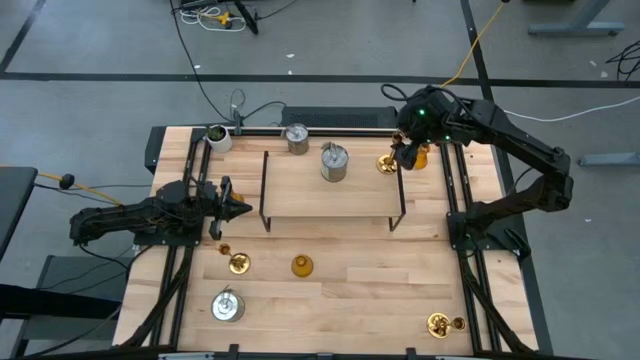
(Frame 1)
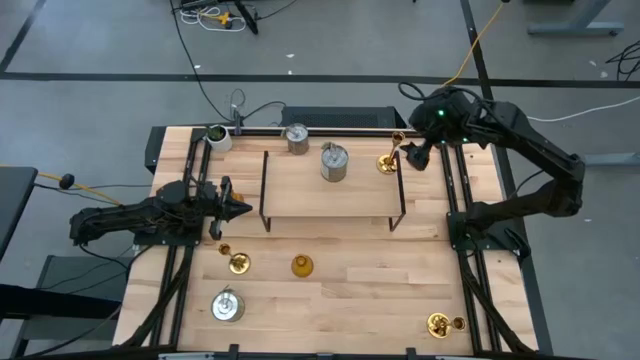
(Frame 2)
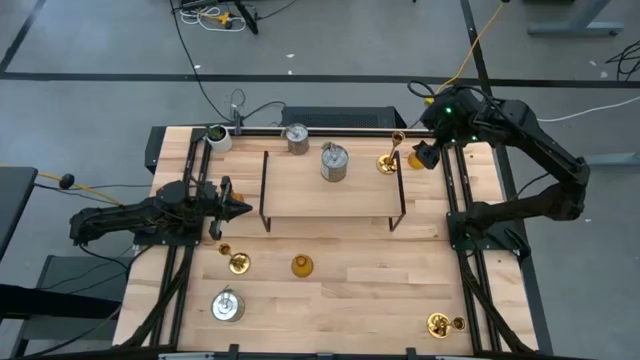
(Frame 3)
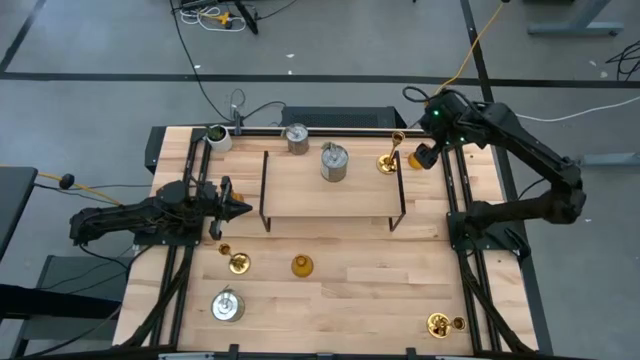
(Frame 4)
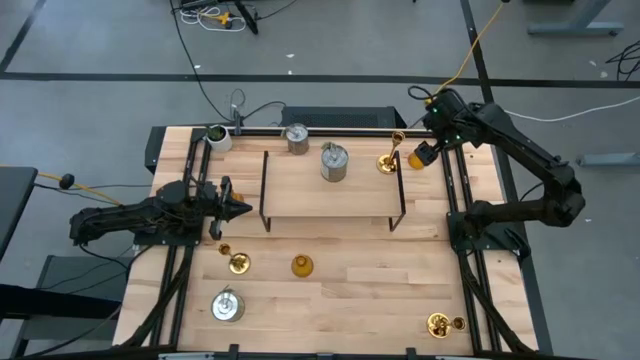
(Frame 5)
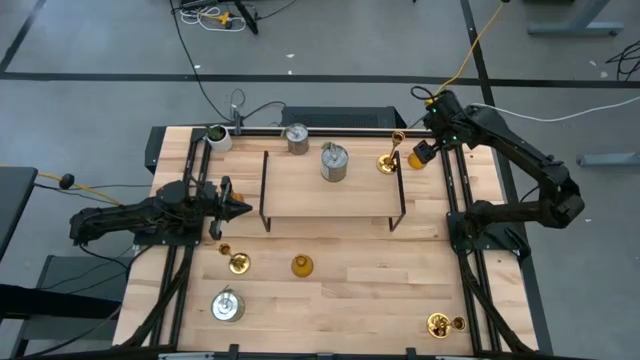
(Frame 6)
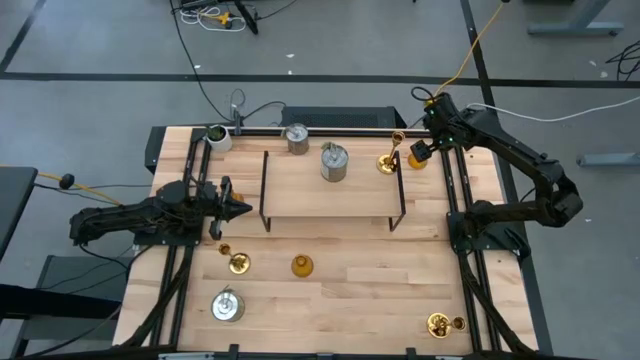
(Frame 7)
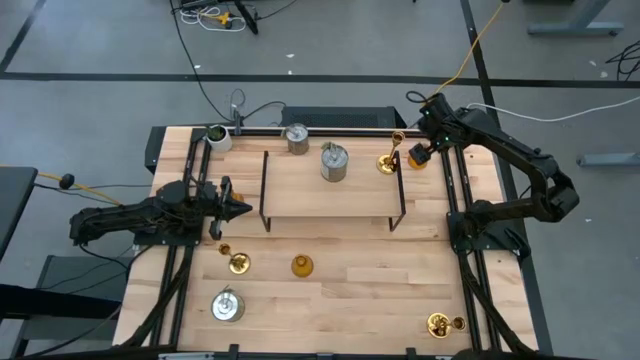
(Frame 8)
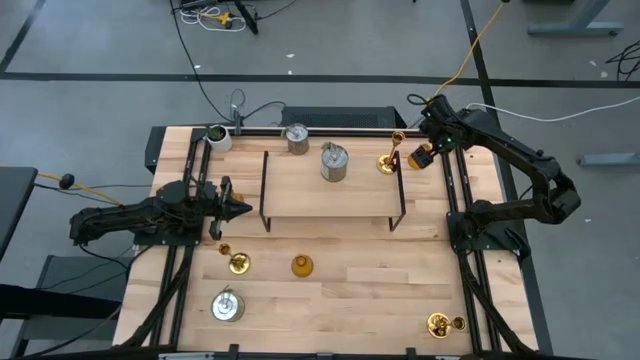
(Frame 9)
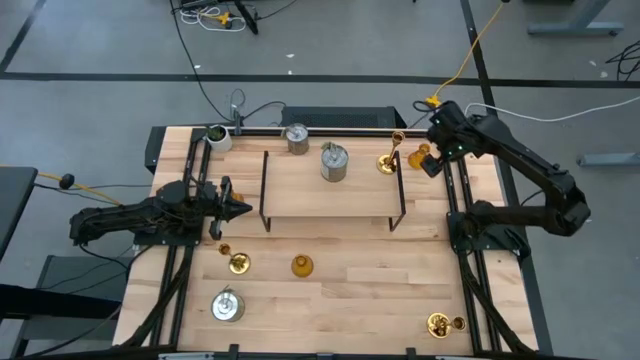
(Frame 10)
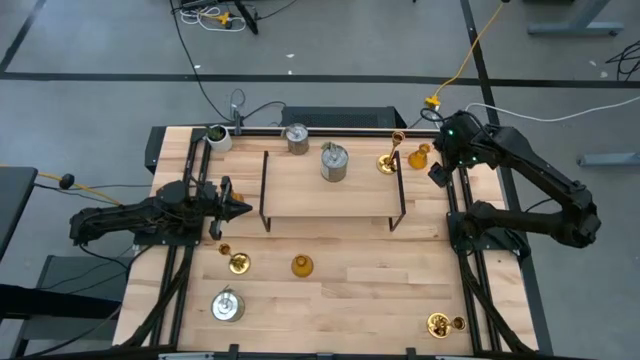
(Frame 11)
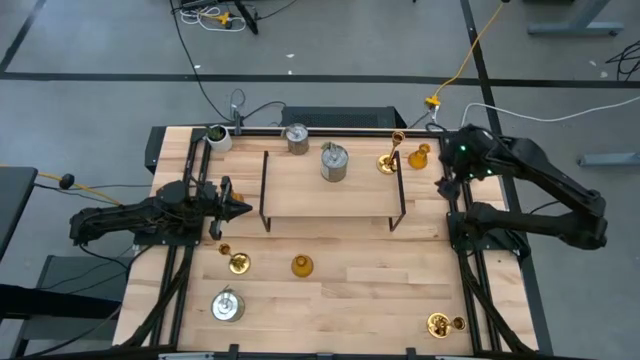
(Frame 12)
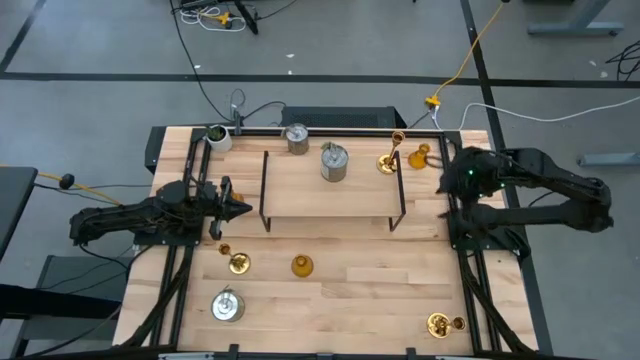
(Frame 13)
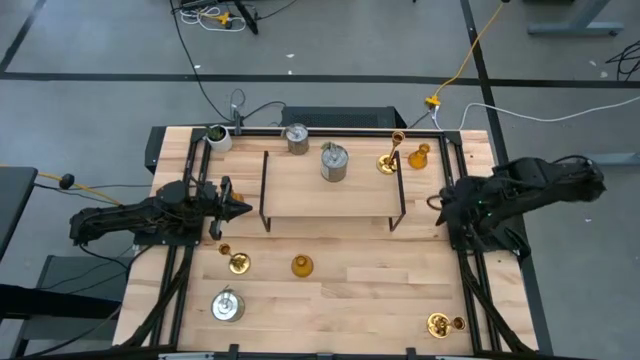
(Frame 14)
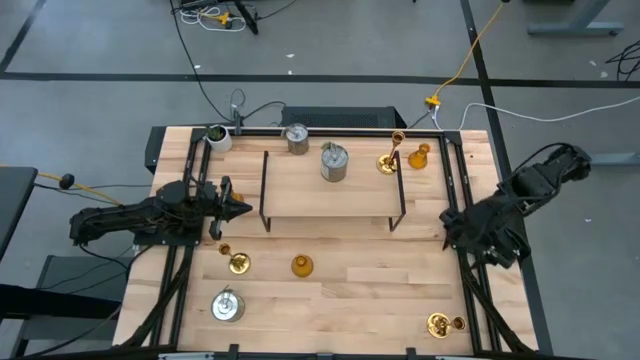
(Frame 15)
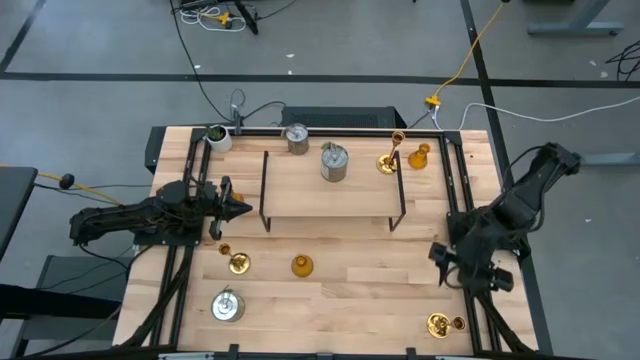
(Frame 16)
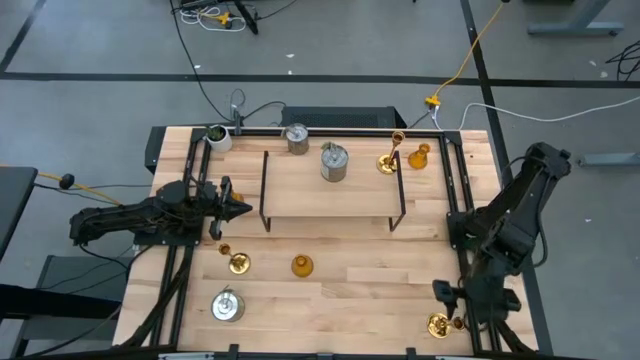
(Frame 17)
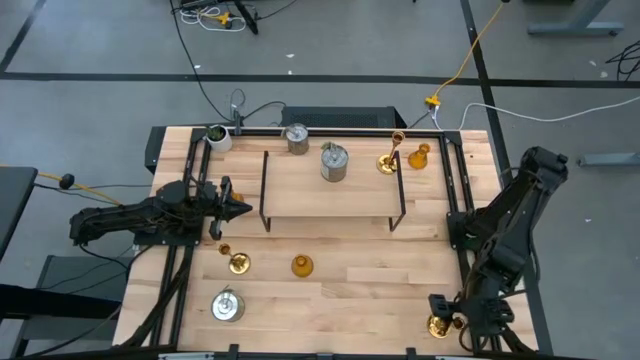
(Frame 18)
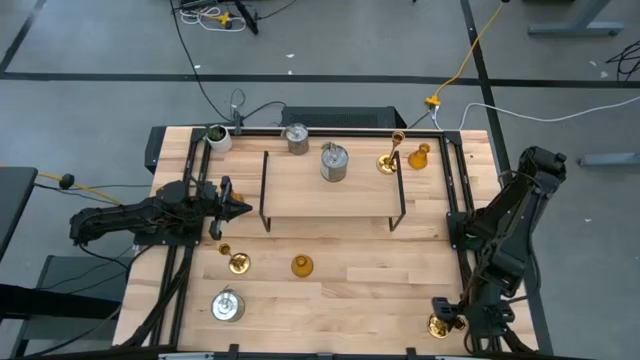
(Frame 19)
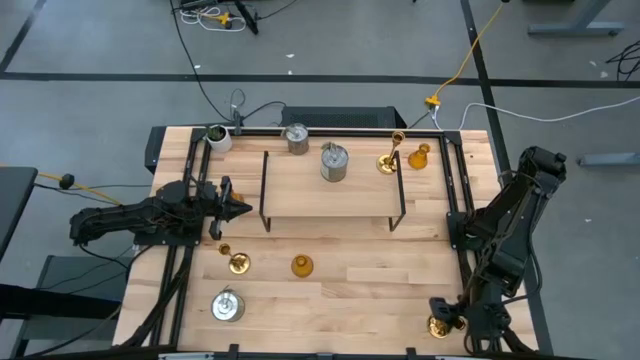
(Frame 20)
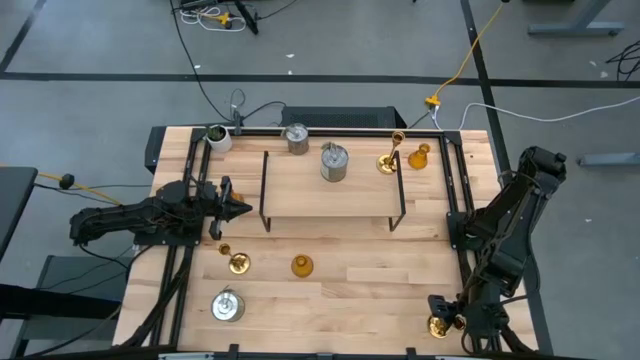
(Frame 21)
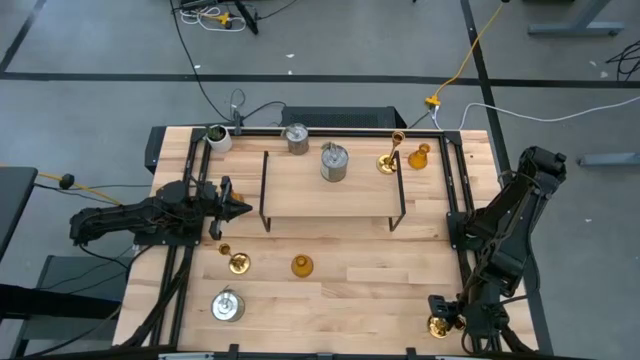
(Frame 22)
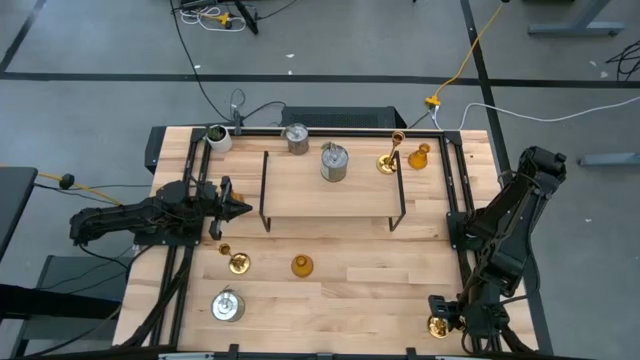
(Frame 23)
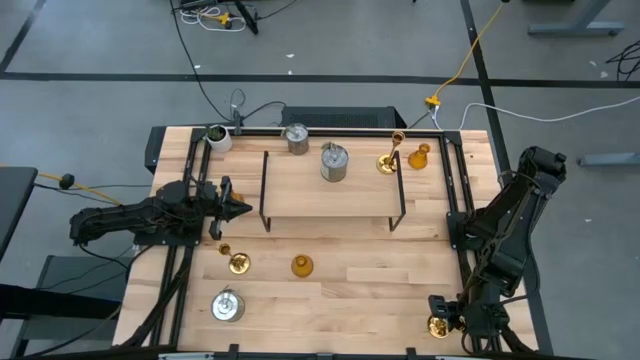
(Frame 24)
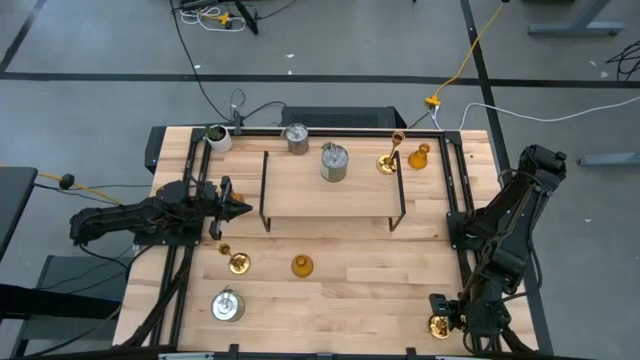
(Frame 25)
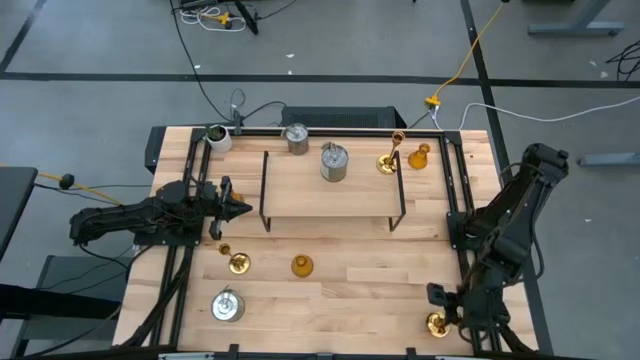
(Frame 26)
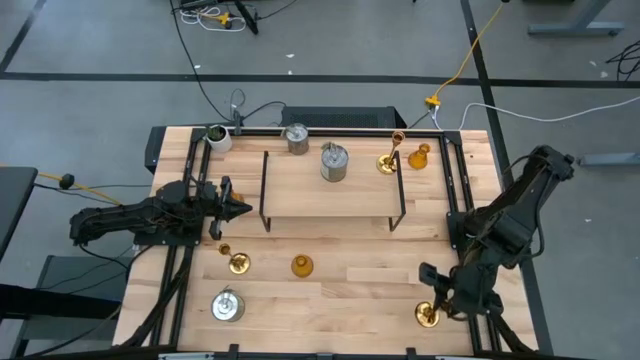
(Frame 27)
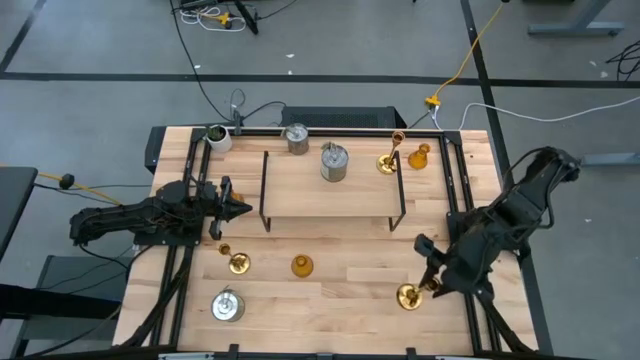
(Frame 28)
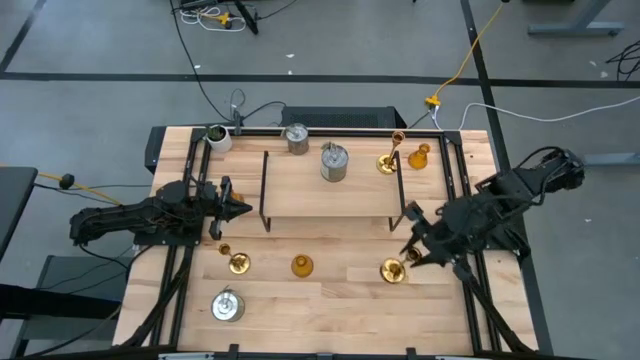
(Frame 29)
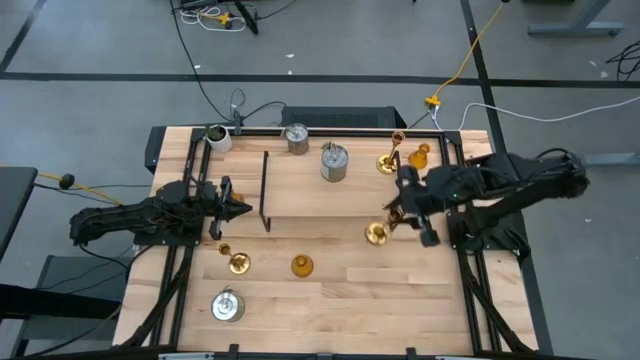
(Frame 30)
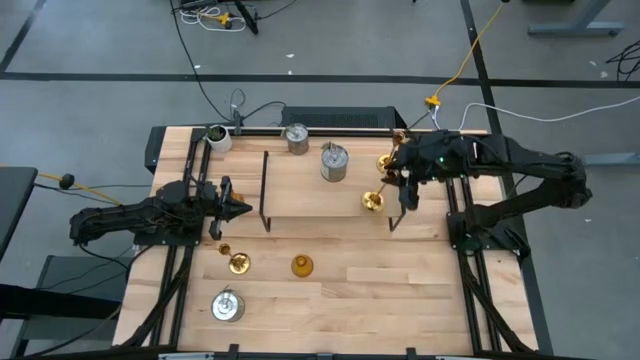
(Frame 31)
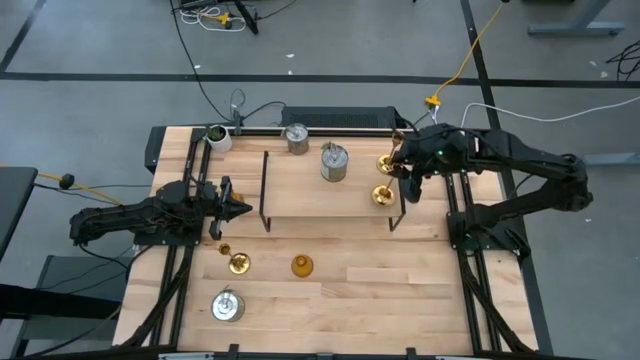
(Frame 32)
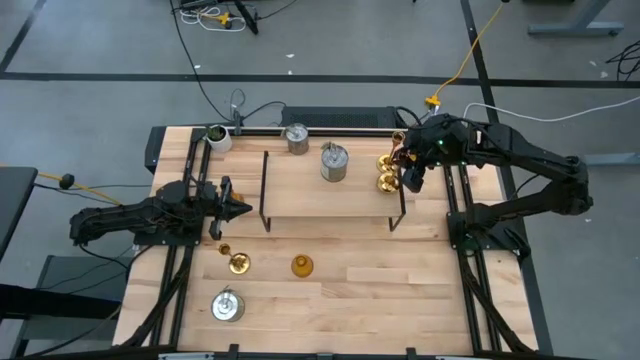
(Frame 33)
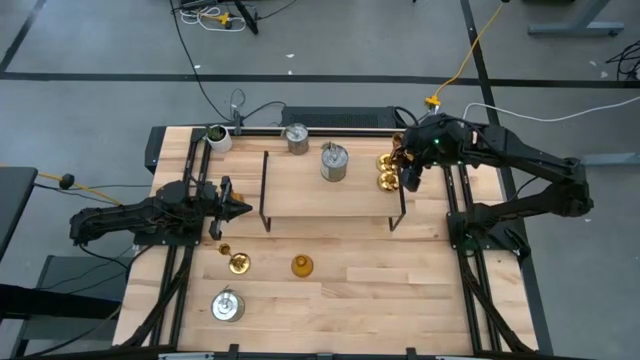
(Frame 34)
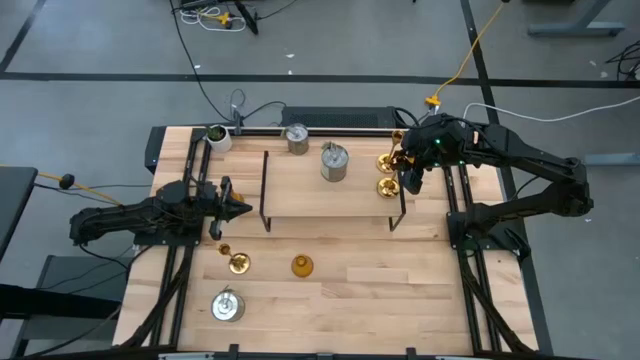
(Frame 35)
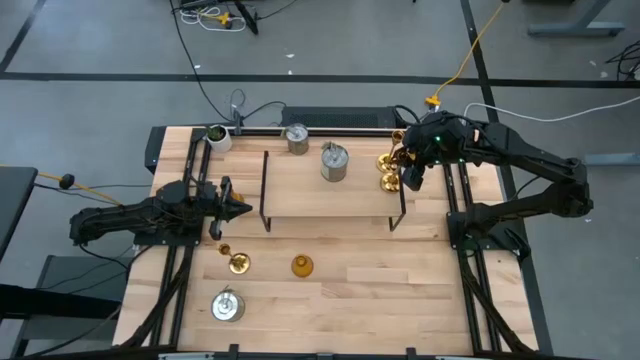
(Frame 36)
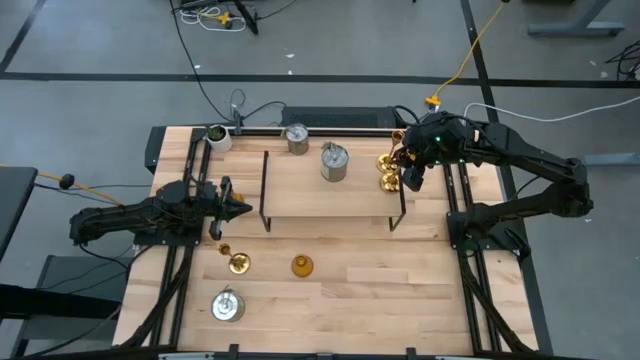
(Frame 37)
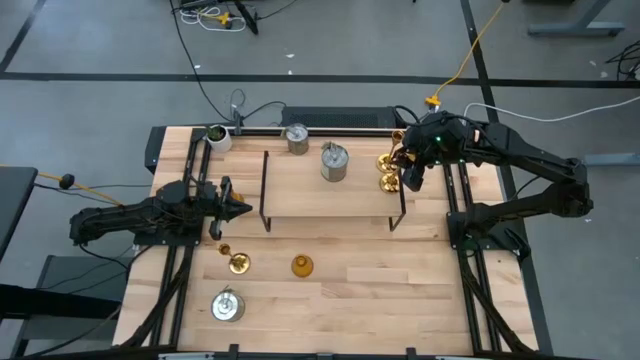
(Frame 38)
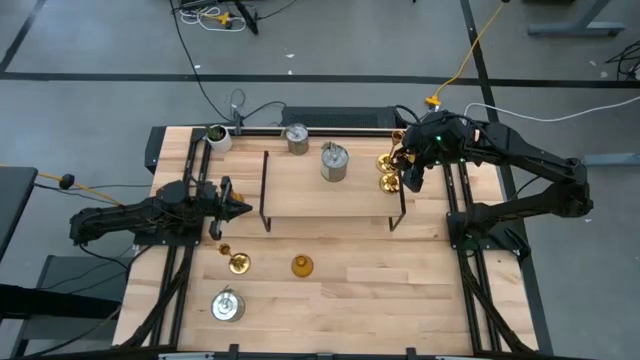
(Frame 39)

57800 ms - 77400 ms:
Task: Pick & Place candle stick holders
Put the right candle holder on the shelf aligned with the other candle holder

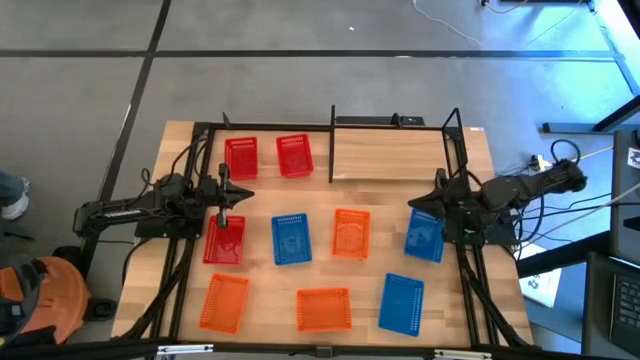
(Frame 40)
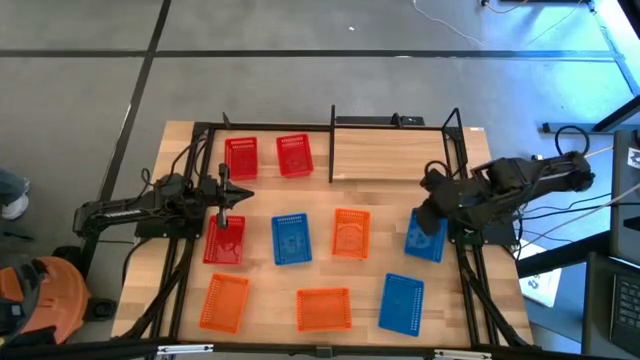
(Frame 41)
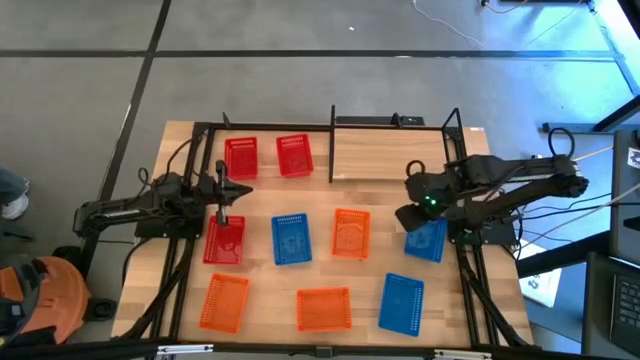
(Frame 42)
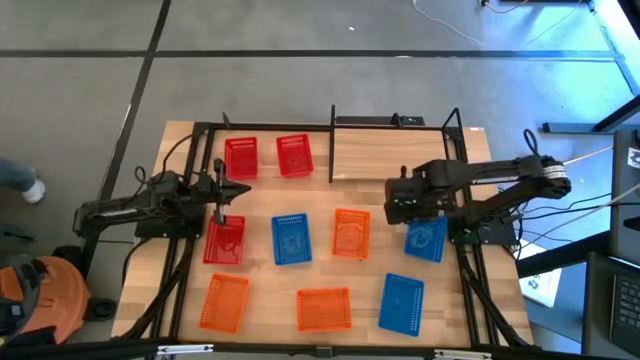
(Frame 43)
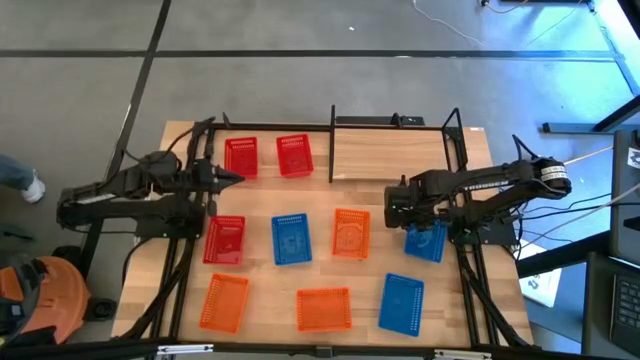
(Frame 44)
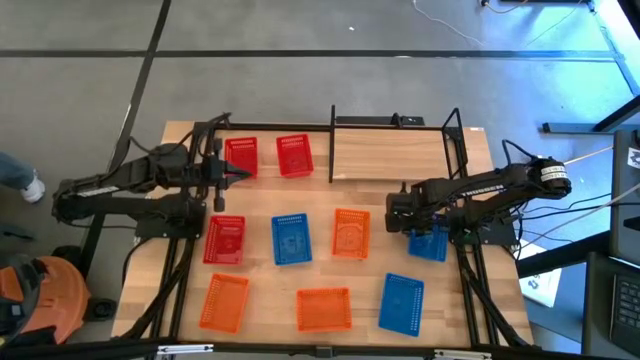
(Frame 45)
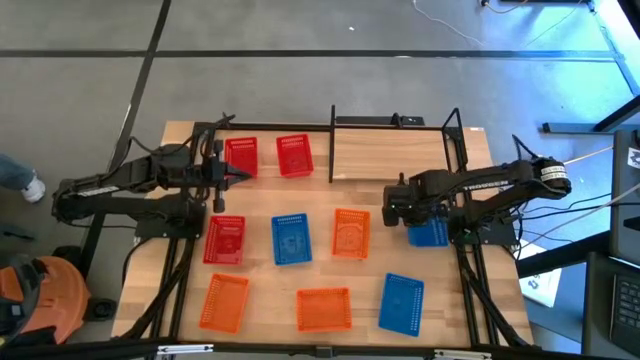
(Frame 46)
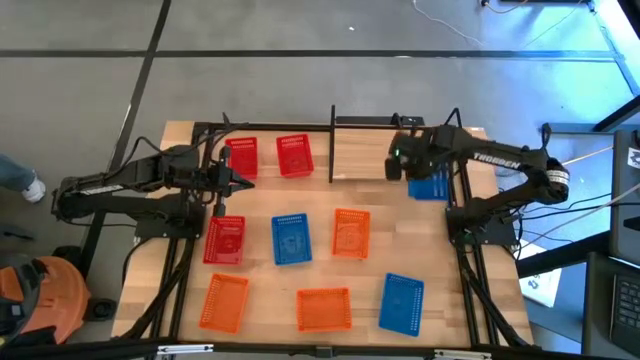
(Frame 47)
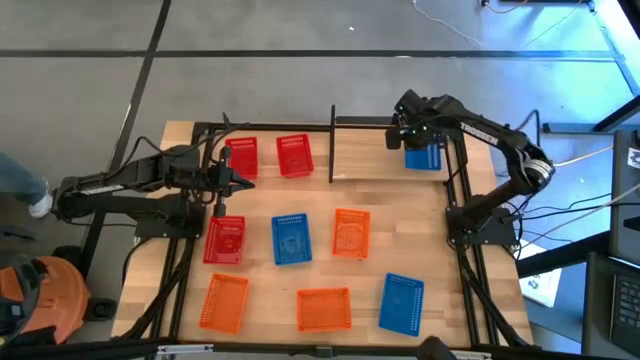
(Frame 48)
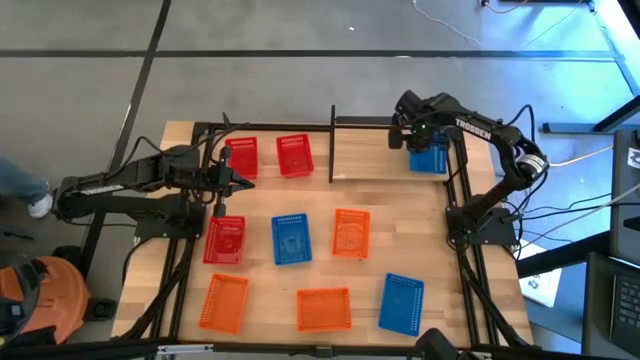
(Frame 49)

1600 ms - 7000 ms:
Task: Stack baskets on shelf by color
Put the top right blue basket on the shelf
